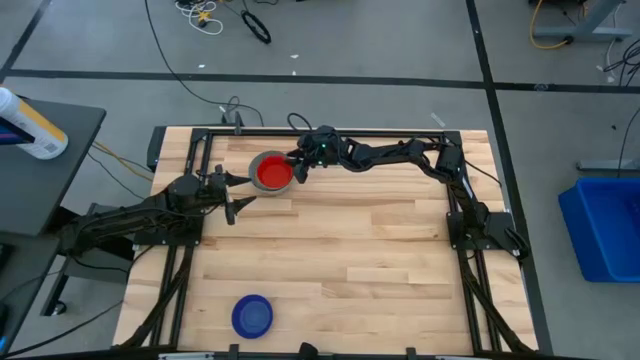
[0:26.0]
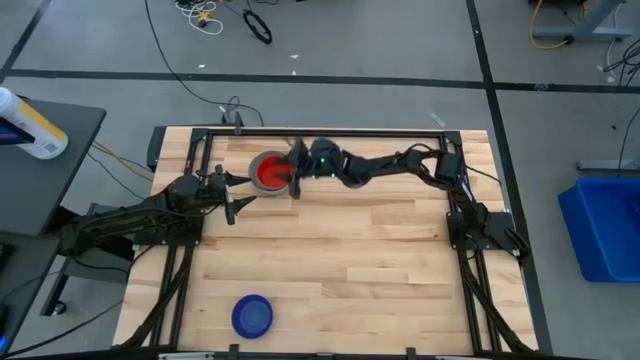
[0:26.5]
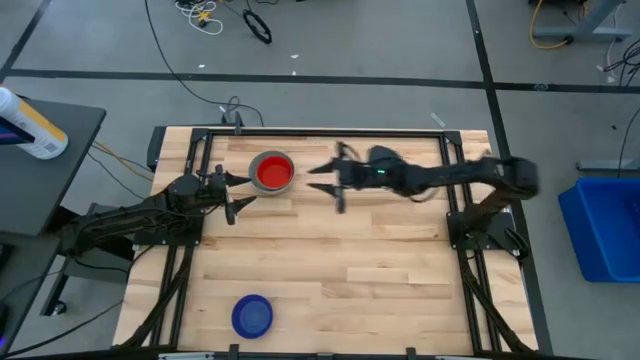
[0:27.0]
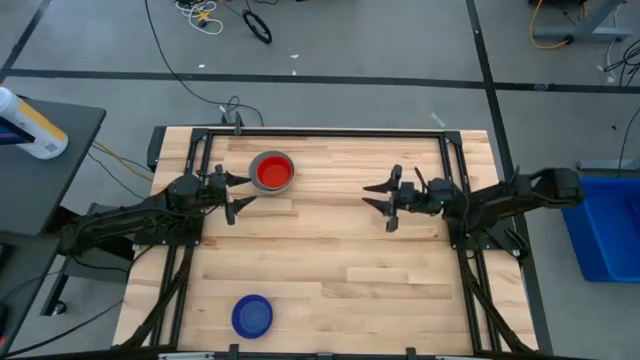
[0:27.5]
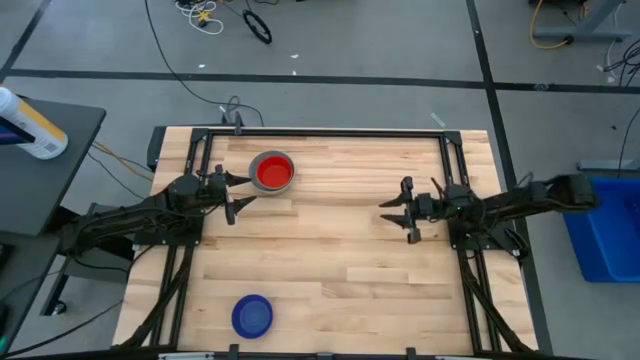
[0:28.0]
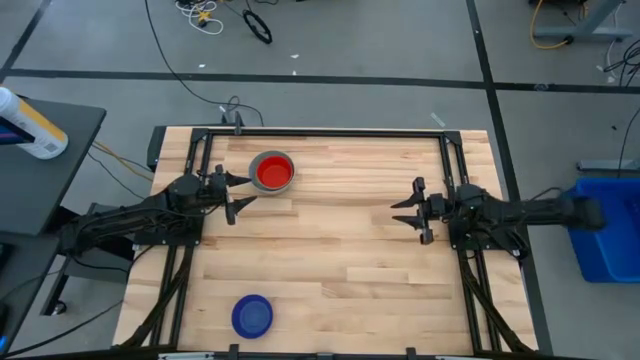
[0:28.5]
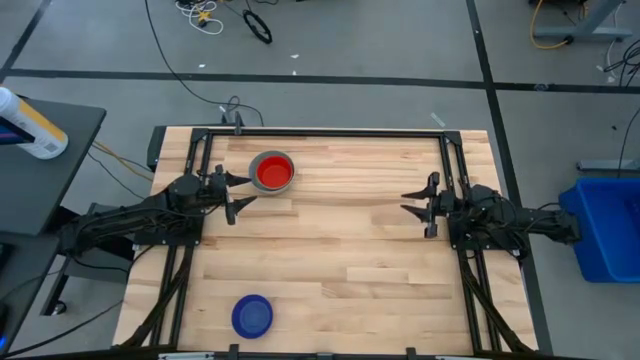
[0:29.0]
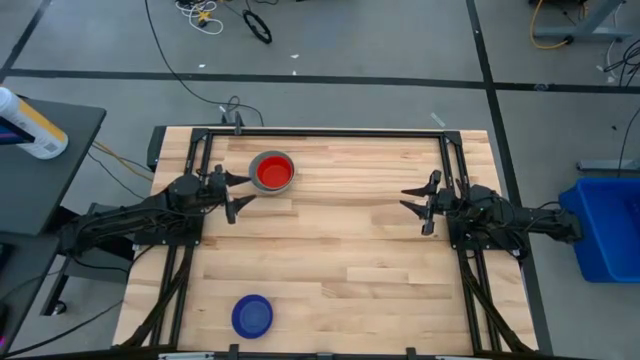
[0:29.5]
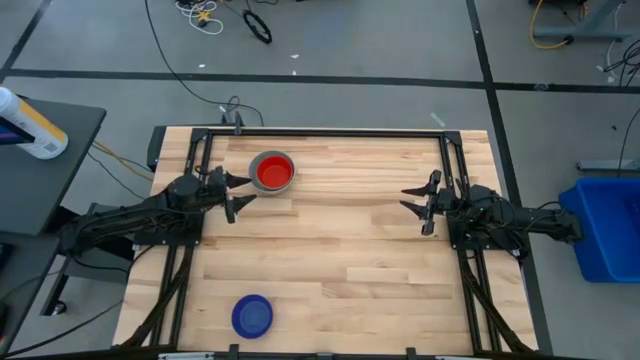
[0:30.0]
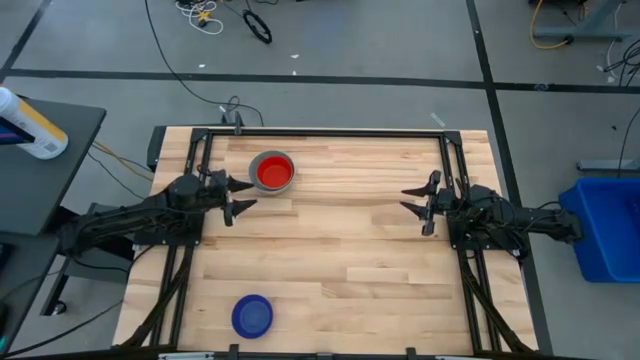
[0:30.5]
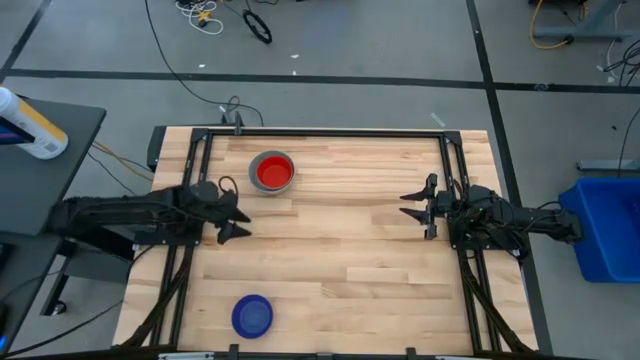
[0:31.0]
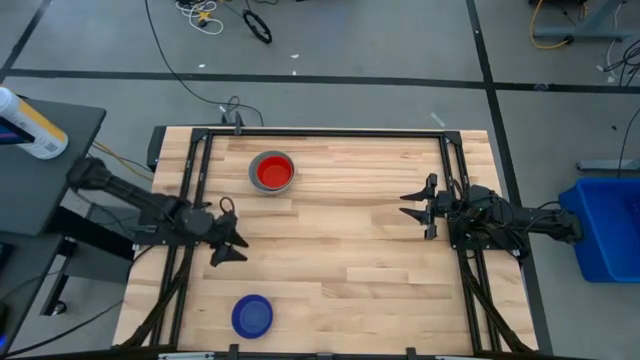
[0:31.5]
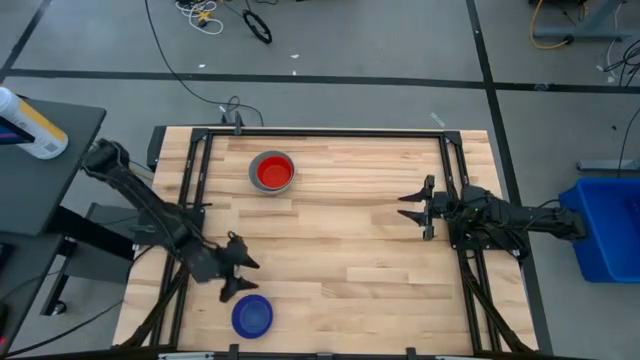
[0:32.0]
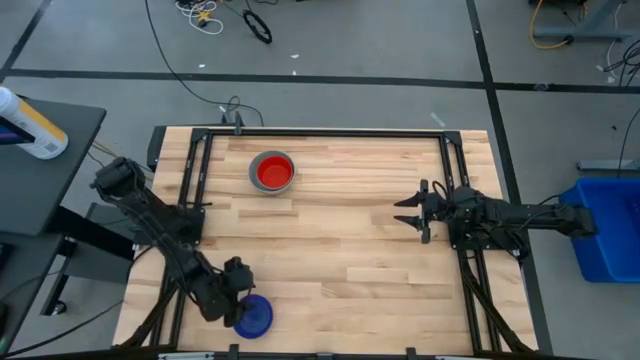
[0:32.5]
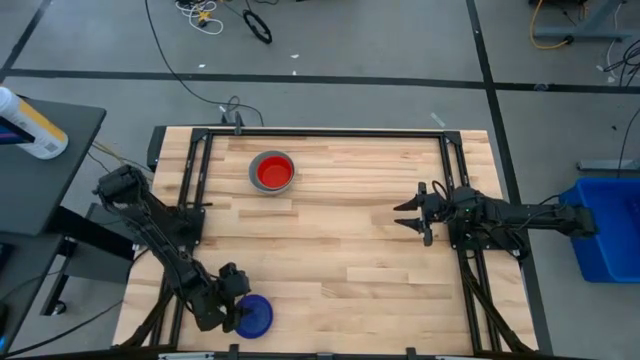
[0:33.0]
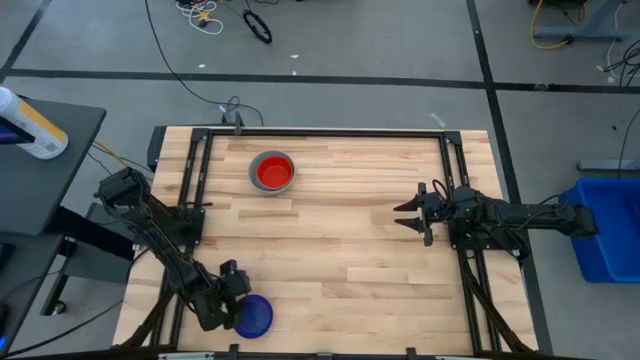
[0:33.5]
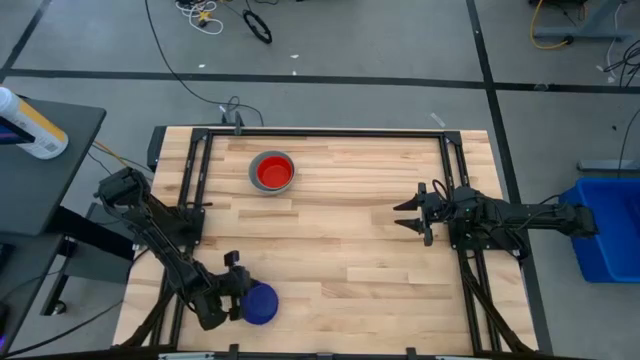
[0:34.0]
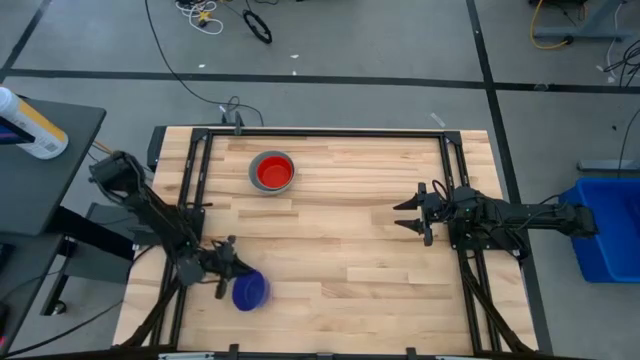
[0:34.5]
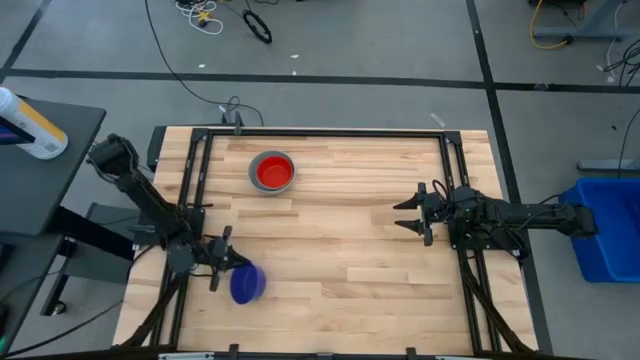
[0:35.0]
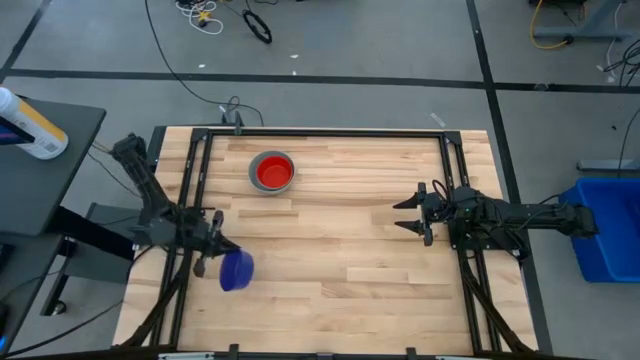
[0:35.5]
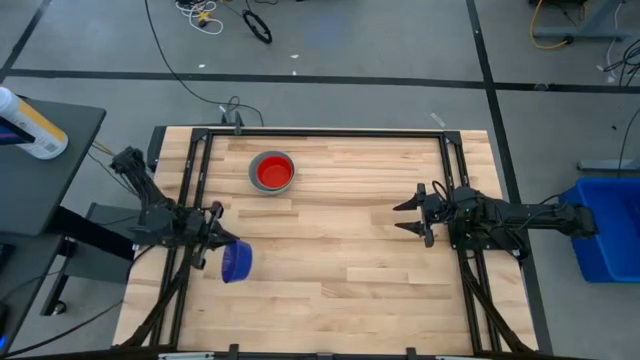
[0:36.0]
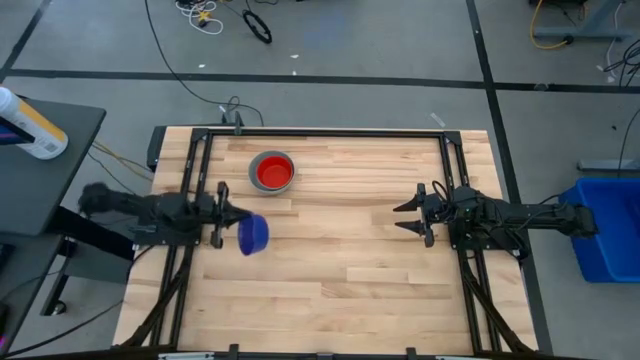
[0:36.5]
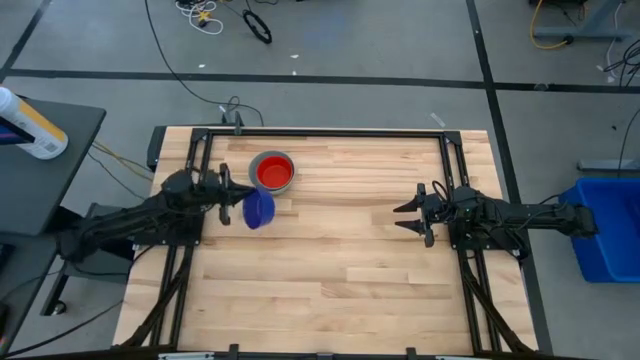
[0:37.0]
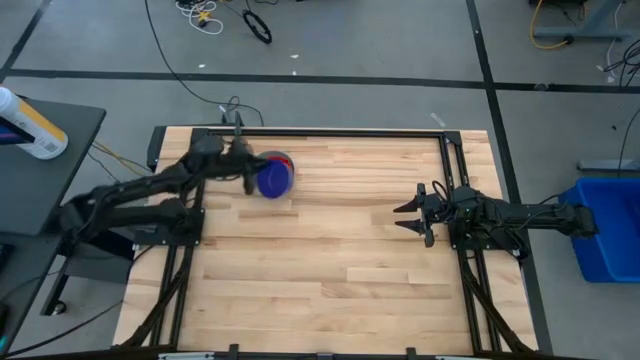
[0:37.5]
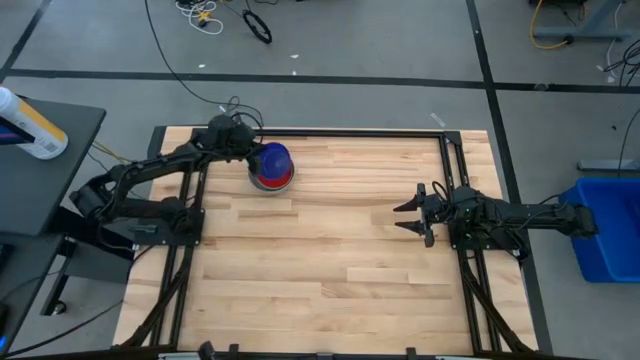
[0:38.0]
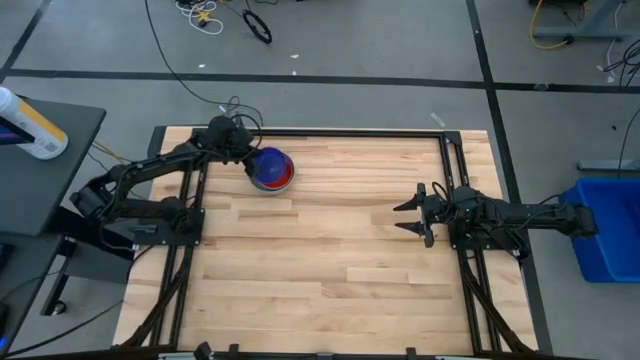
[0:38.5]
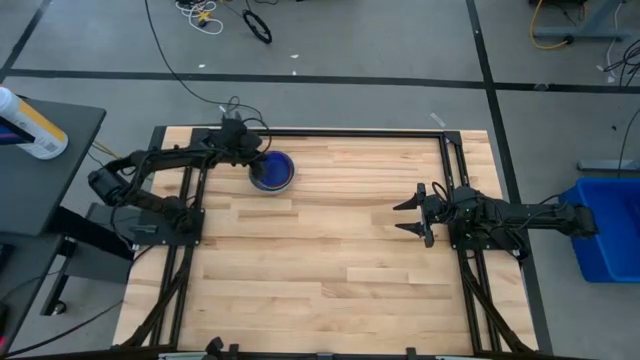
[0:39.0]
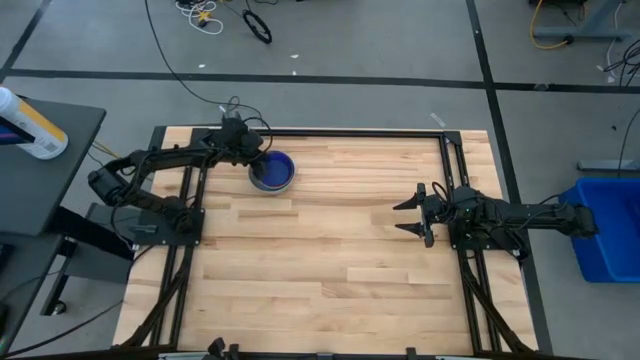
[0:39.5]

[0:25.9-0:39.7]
Stack the blue bowl on the red bowl

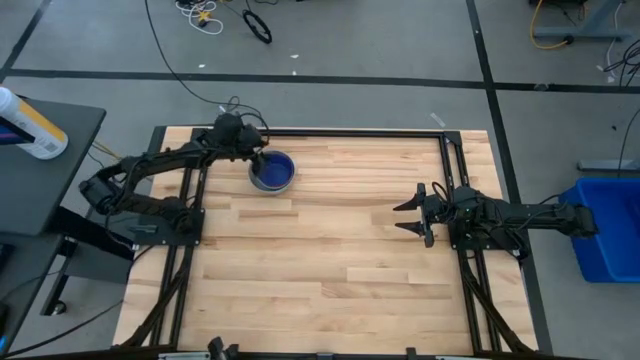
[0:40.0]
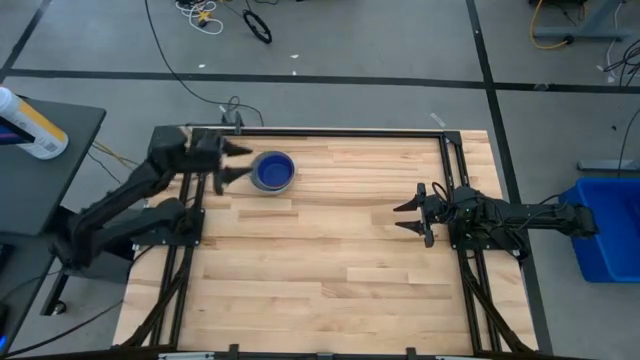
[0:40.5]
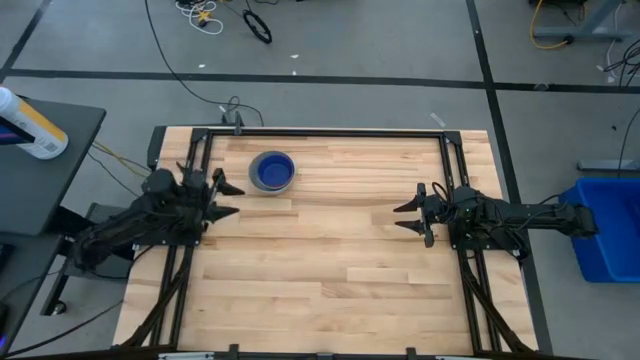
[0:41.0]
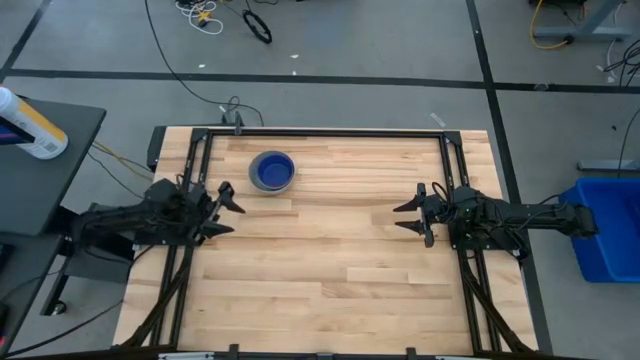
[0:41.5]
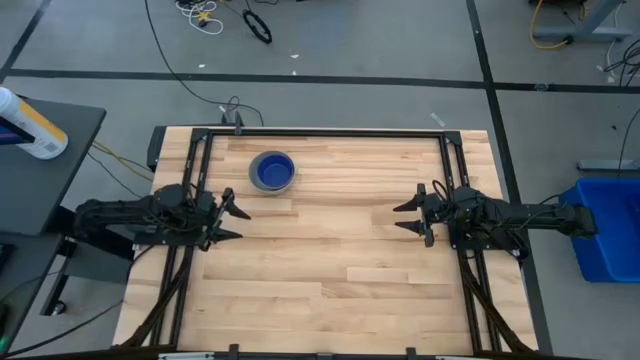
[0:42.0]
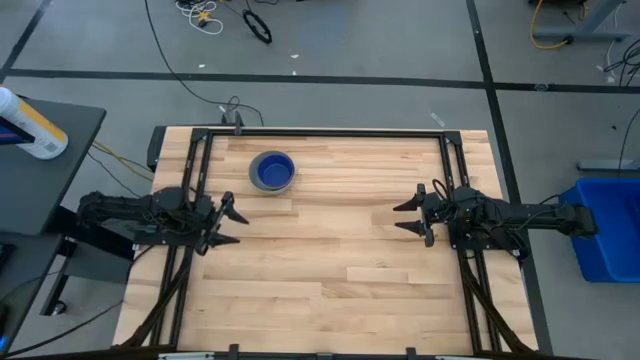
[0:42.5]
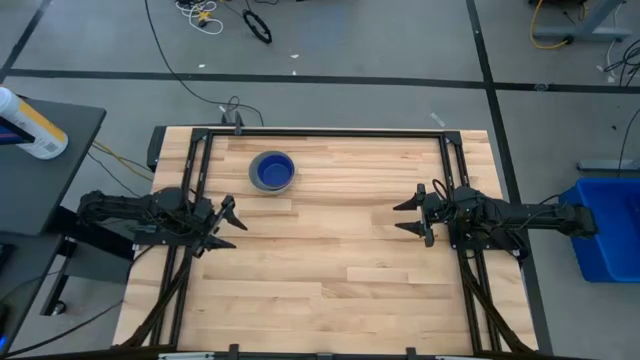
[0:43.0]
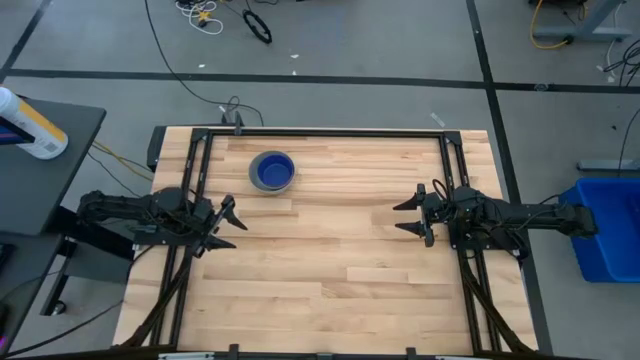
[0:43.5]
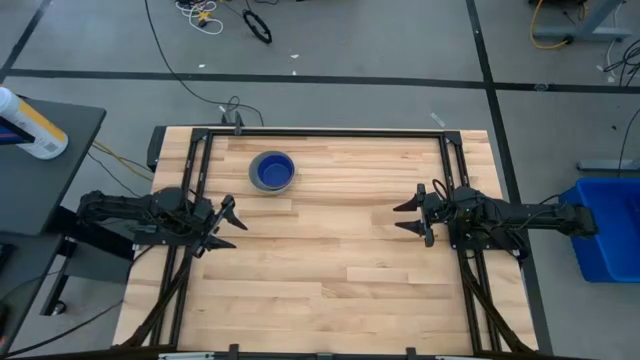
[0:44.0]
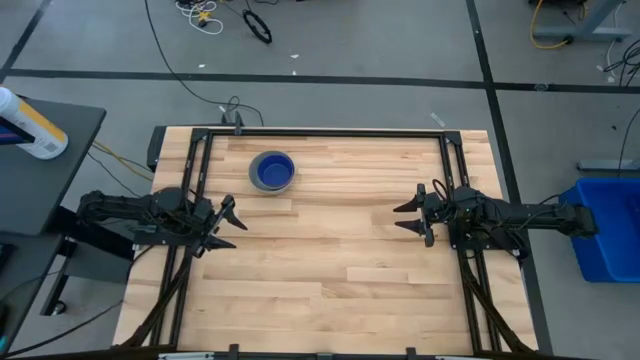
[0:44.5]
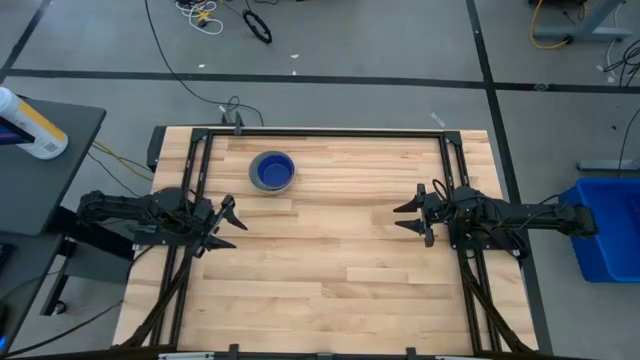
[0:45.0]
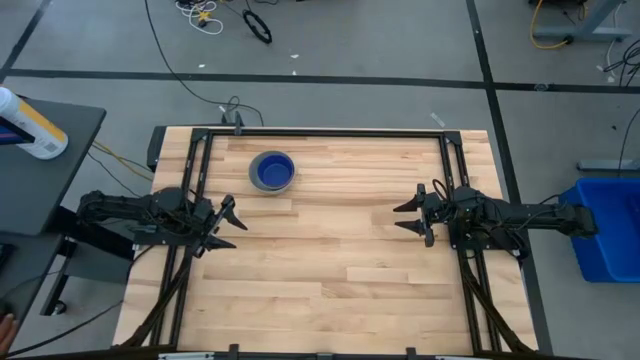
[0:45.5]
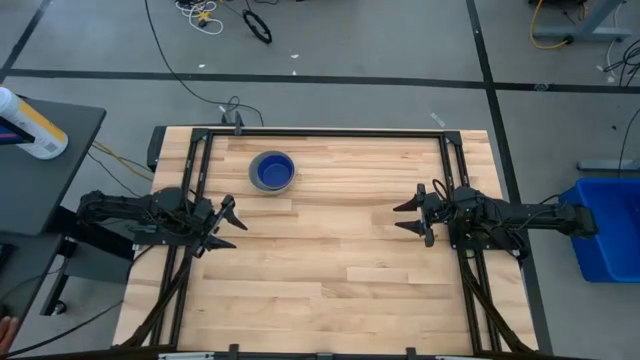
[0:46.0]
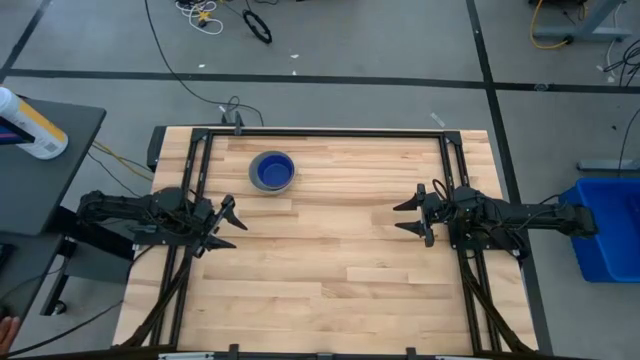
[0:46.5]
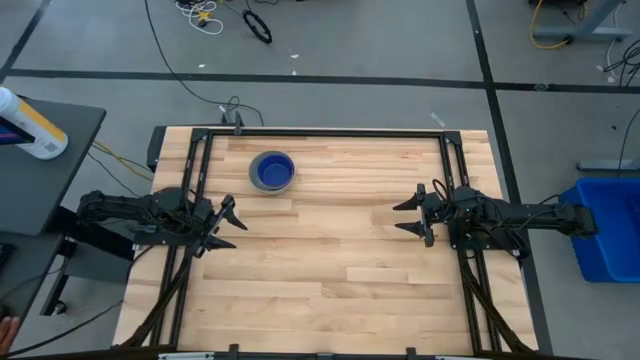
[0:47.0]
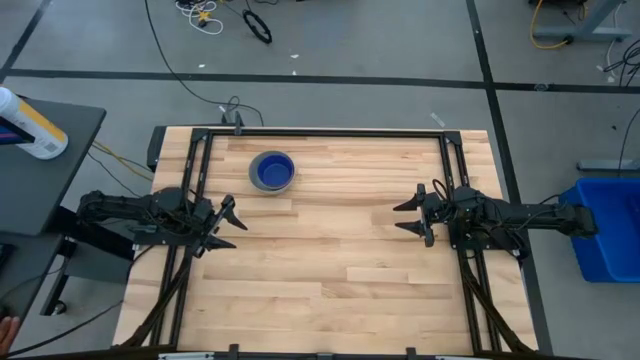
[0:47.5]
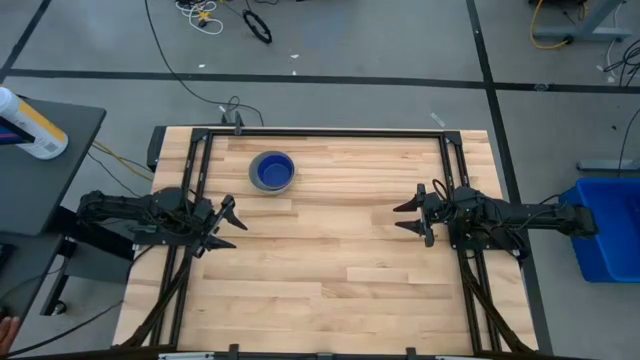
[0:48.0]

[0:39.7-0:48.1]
Return to Home Position
